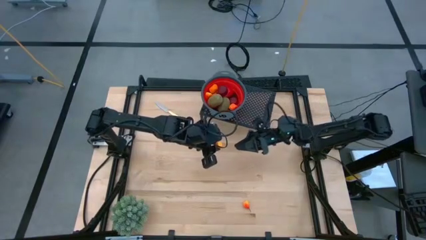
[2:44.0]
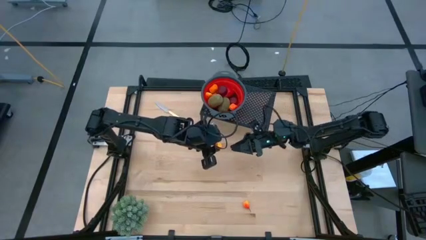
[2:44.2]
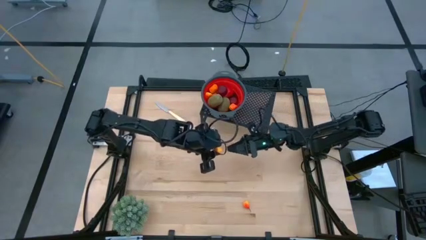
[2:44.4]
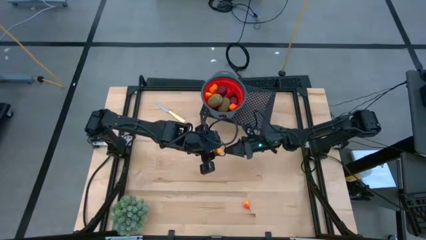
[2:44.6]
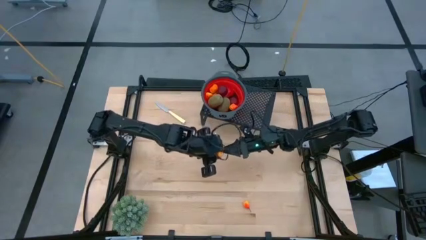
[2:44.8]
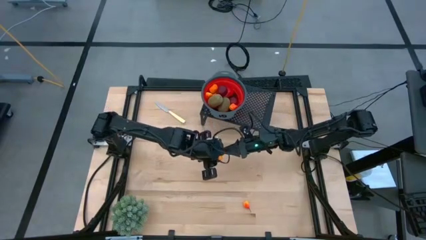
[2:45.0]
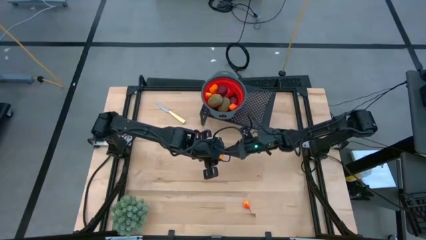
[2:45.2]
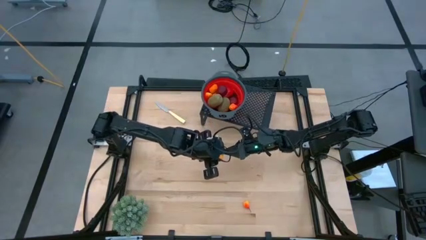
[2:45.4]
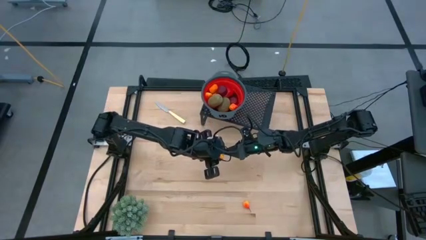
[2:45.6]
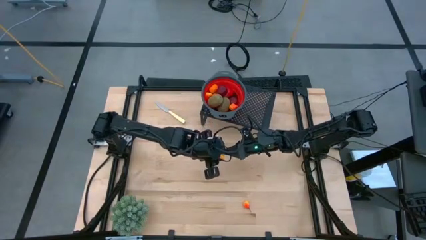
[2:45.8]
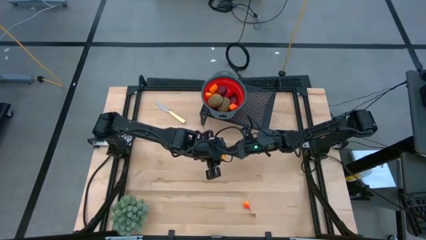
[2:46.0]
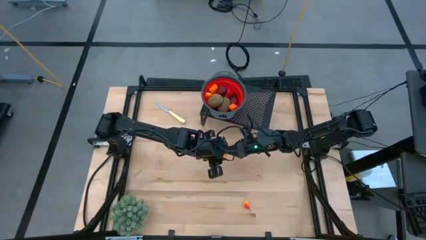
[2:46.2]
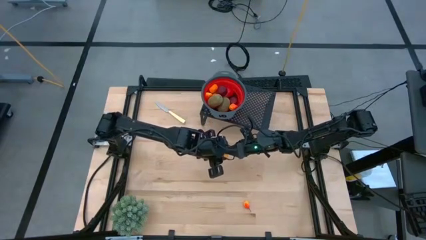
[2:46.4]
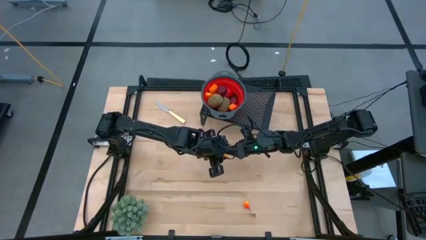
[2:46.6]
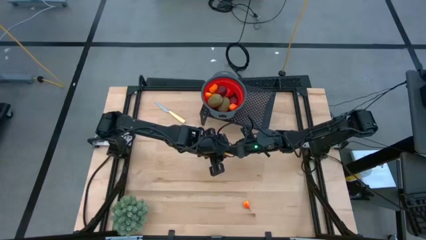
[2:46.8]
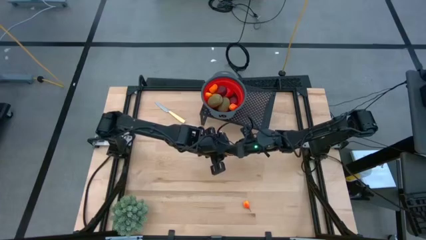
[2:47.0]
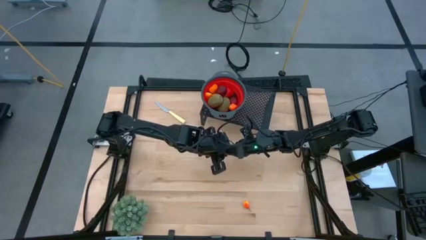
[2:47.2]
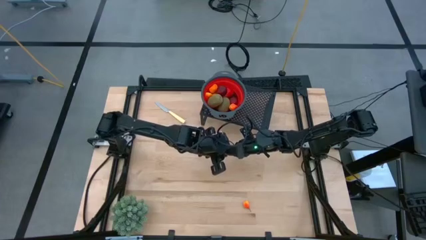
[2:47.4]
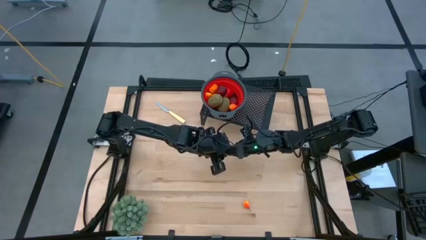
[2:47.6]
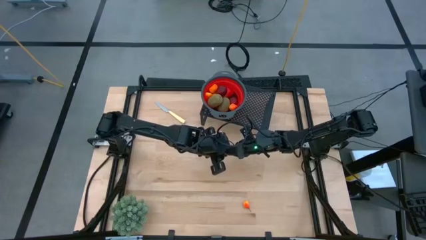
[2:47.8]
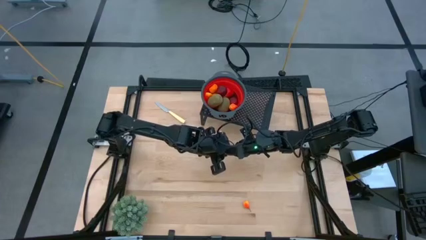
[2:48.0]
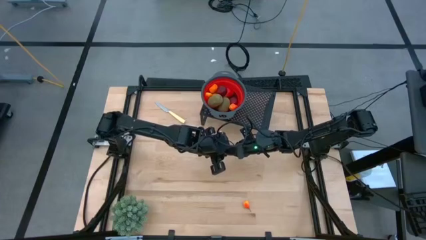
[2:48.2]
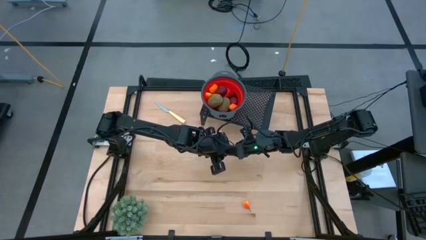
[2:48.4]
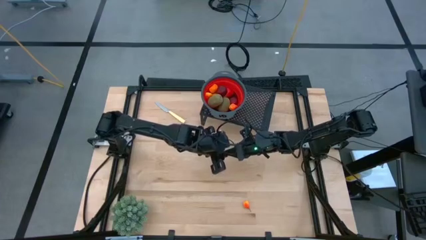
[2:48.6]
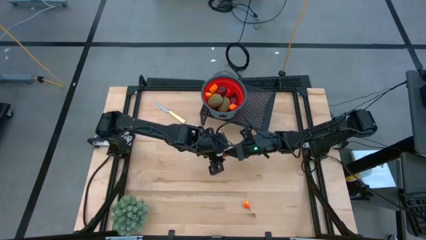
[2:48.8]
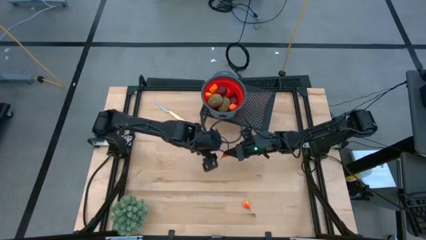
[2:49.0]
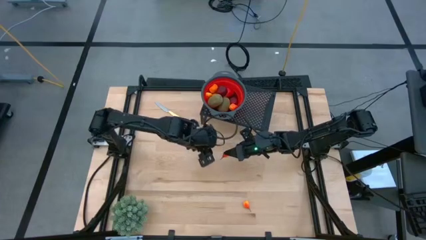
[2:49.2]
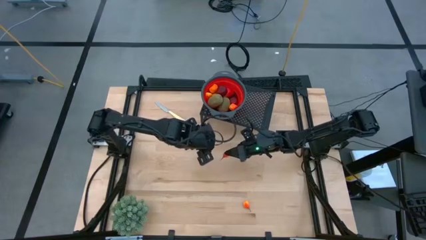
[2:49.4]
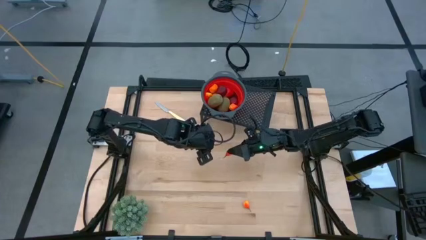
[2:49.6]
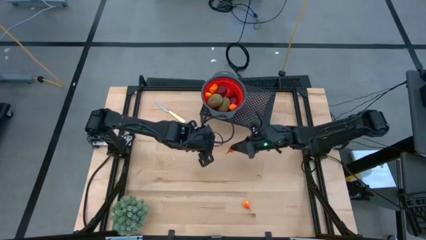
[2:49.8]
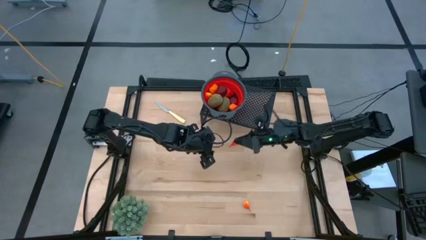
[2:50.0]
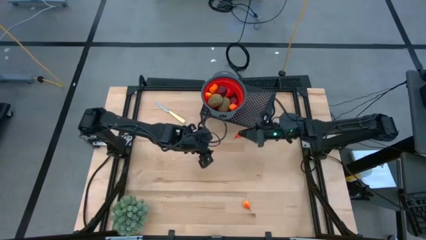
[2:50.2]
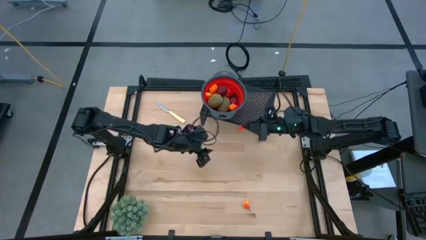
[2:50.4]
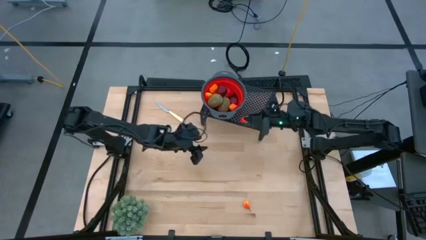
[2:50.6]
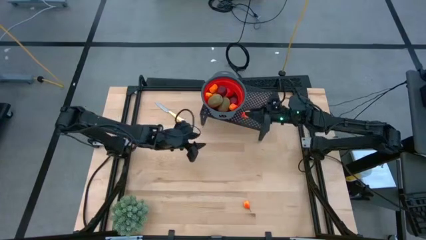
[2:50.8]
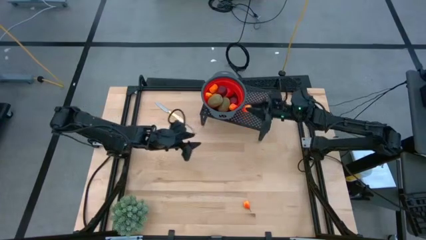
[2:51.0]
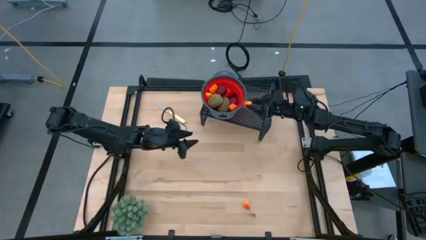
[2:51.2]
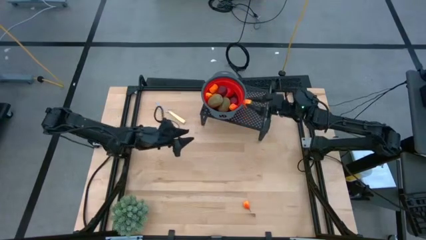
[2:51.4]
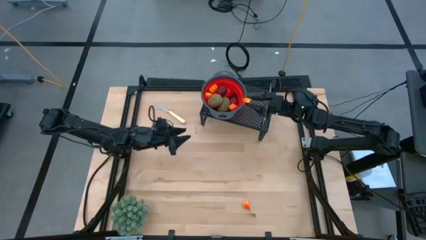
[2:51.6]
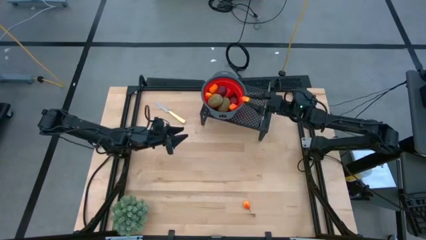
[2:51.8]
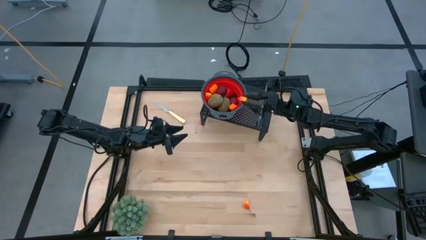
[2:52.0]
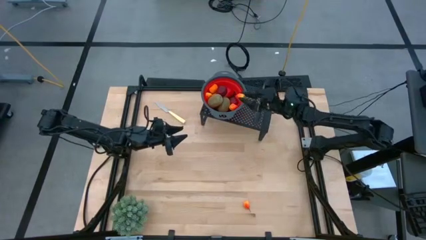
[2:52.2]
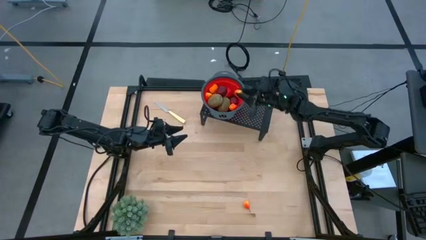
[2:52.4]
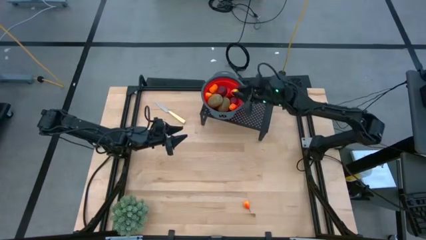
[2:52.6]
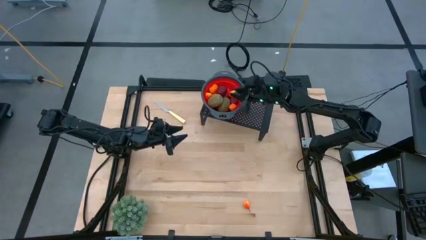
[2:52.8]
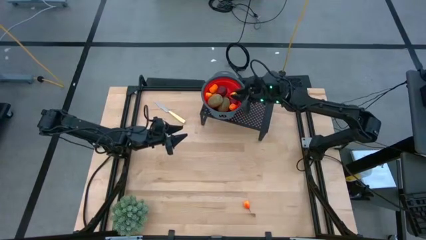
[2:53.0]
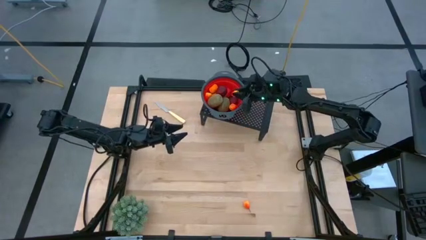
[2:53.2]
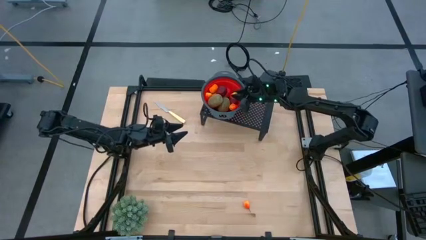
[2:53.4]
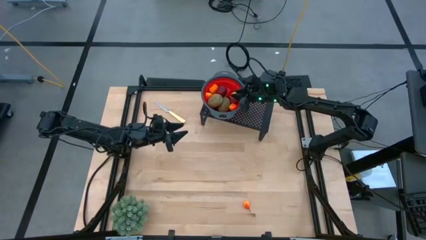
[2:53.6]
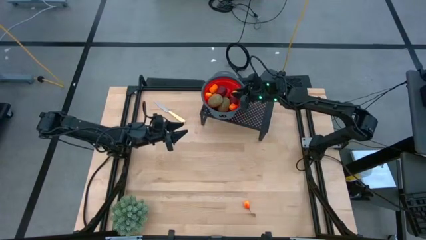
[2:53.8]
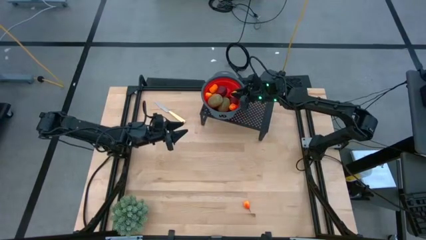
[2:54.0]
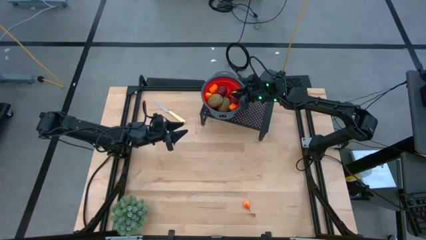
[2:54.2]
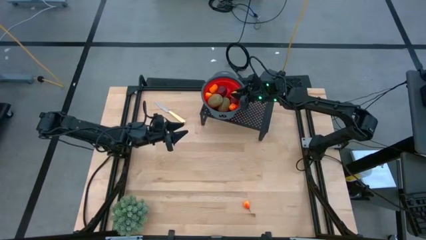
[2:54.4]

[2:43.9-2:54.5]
Task: Pick & Place Fruit
Put the top pear into the strainer bowl on the shelf
